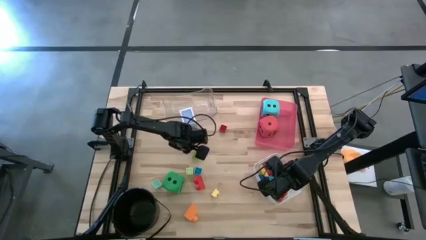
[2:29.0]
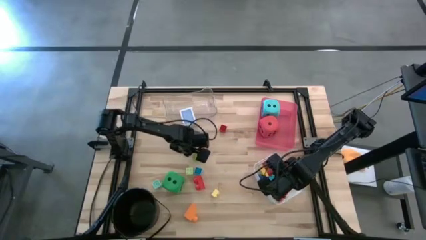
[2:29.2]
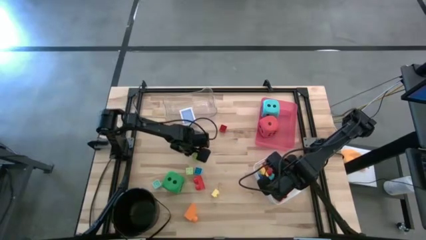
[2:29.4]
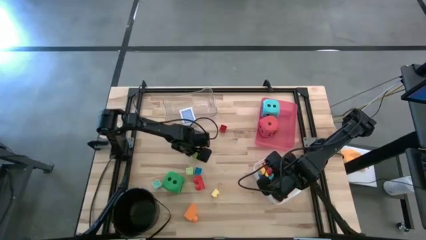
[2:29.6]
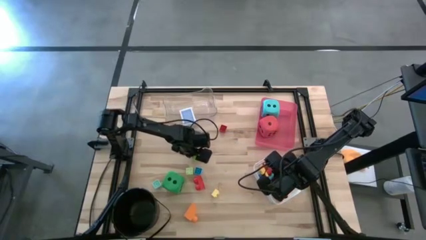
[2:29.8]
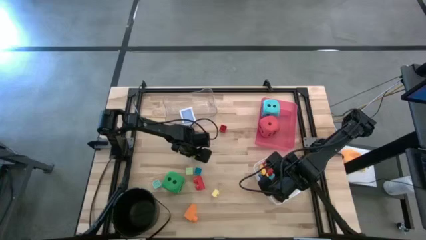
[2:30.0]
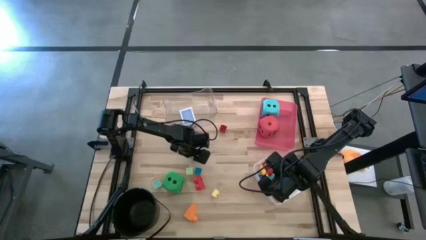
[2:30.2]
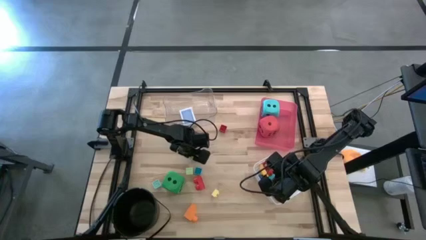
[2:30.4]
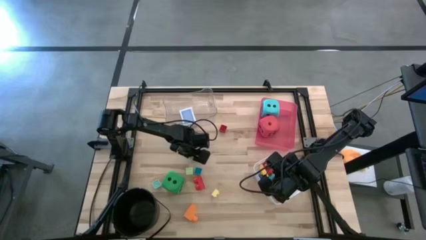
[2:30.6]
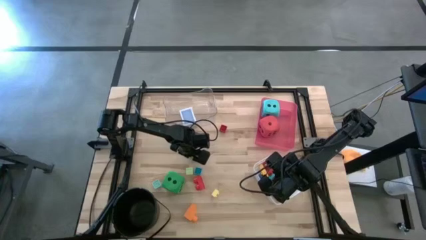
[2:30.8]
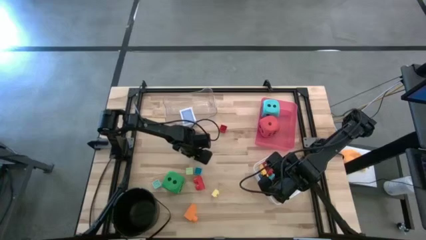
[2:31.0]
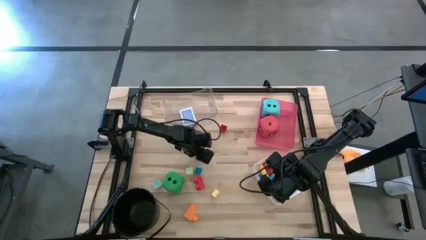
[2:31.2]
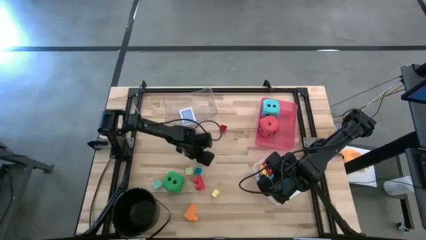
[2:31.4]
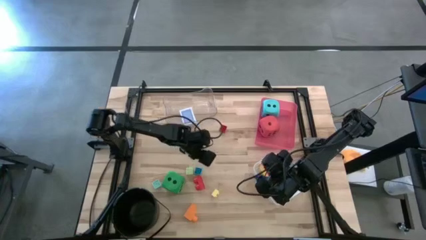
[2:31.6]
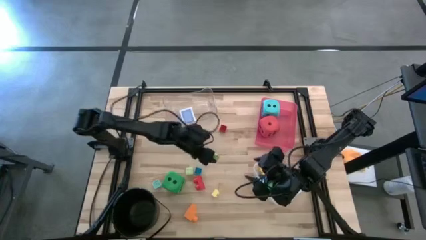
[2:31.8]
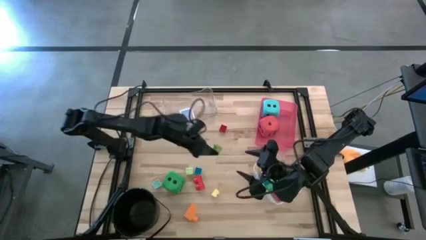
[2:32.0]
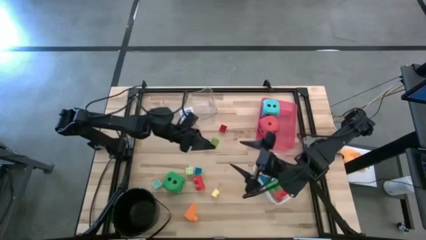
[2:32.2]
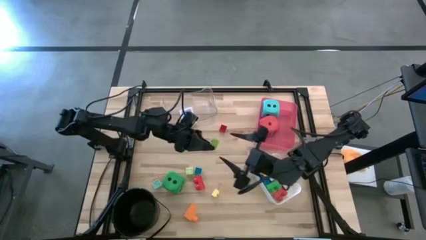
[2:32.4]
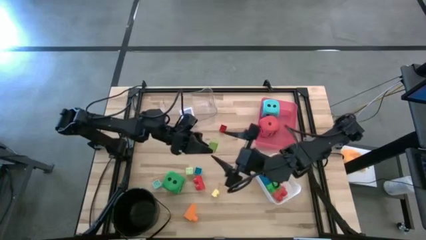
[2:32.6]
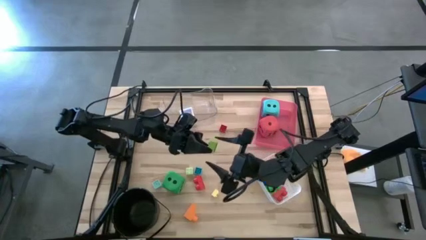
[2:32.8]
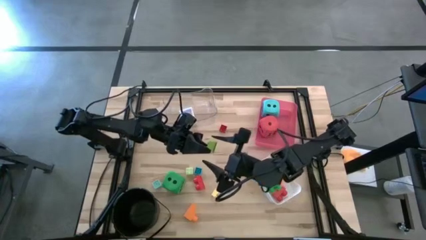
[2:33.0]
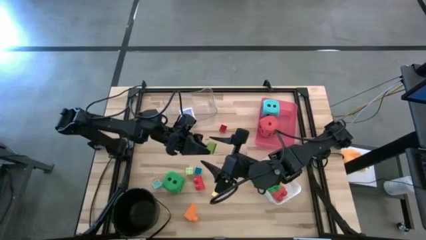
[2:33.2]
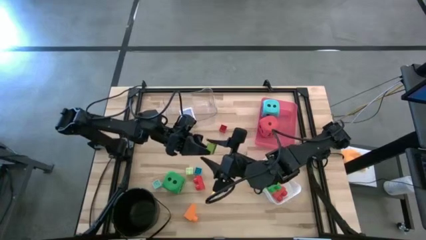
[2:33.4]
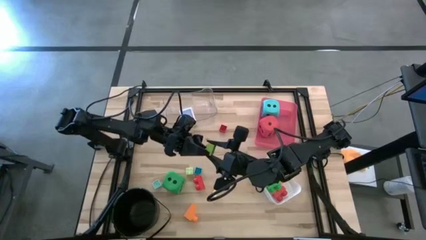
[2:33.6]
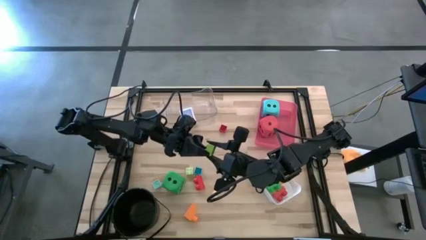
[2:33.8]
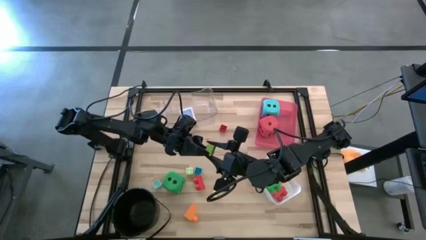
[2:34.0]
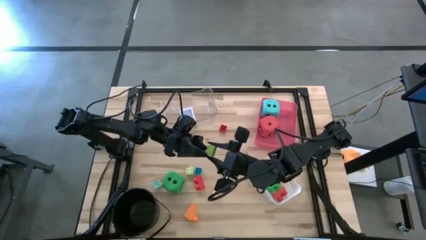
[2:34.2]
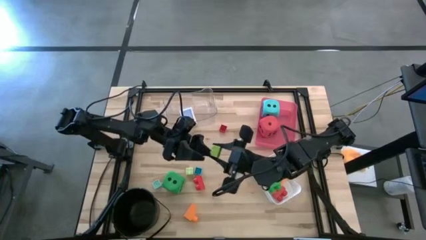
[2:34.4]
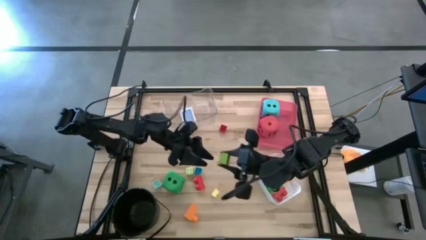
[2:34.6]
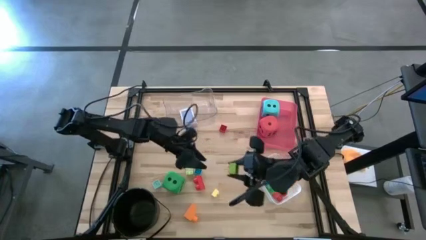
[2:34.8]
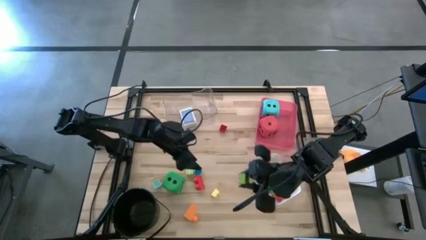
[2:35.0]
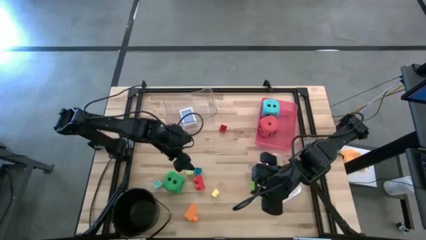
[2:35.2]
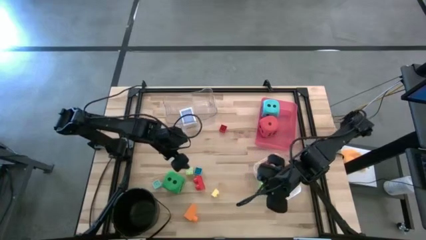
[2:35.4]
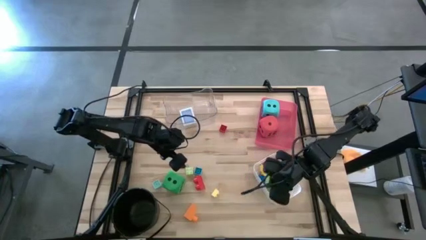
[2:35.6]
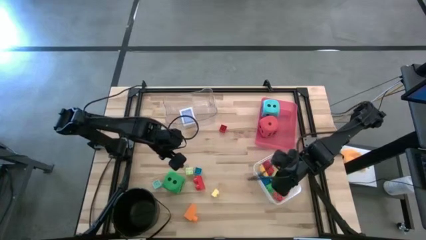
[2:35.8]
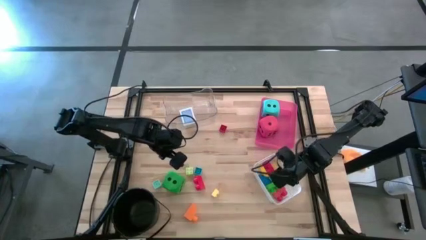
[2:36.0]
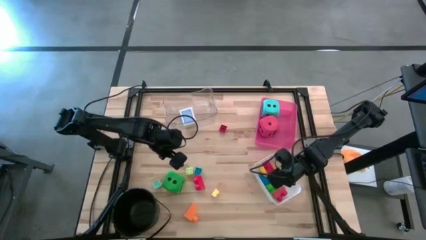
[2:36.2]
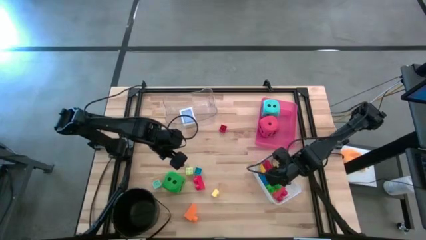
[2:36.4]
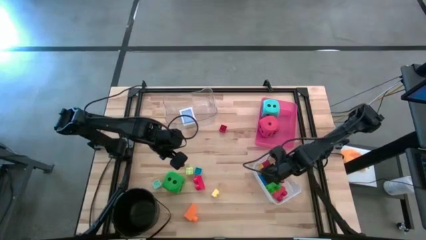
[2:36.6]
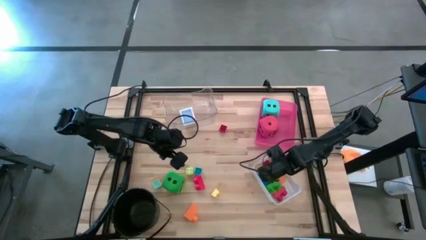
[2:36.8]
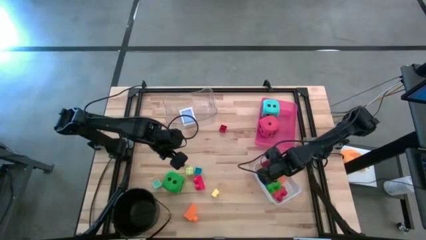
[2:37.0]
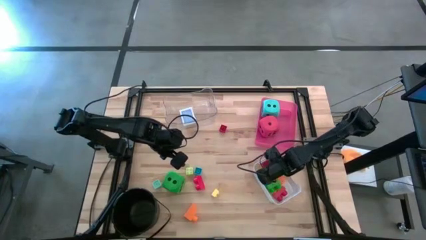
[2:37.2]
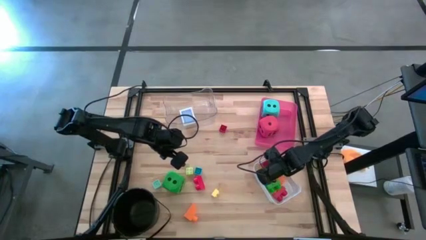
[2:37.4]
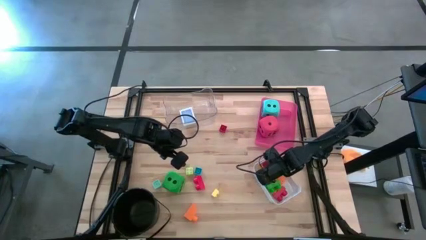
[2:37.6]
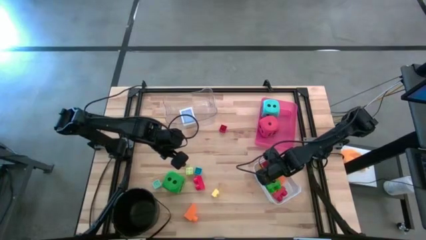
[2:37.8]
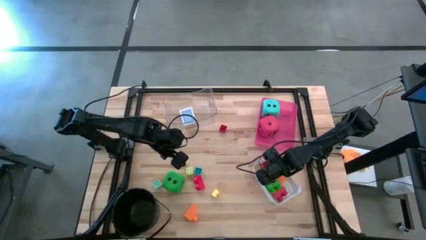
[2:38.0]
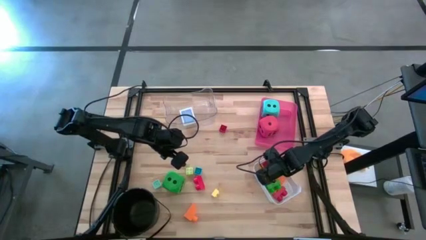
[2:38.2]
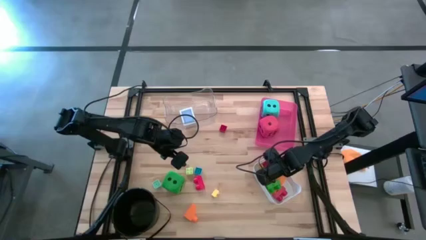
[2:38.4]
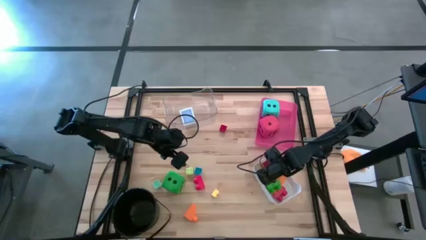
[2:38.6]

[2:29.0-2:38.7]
Task: Pick & Place Toys
Put the green game piece into the white bin

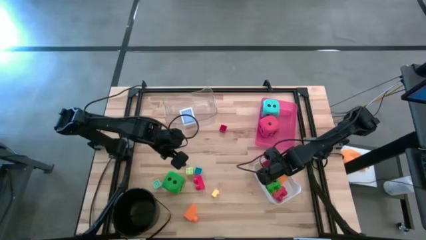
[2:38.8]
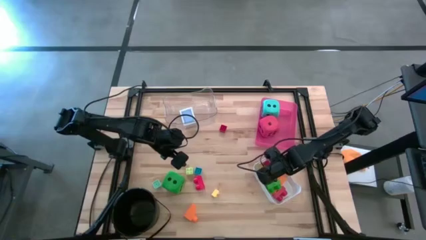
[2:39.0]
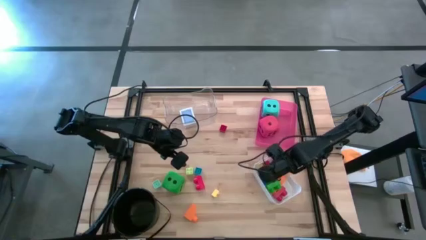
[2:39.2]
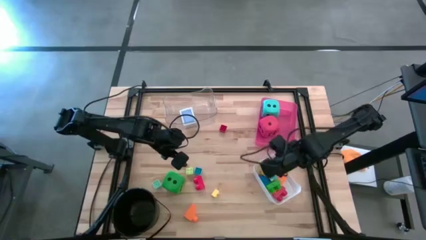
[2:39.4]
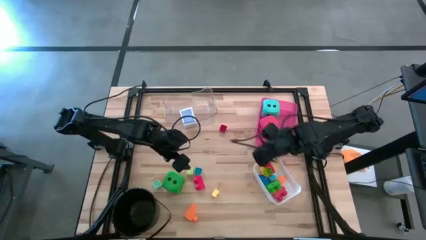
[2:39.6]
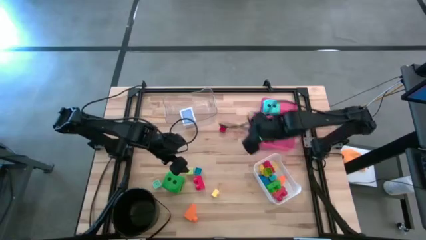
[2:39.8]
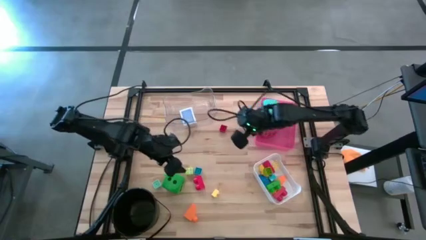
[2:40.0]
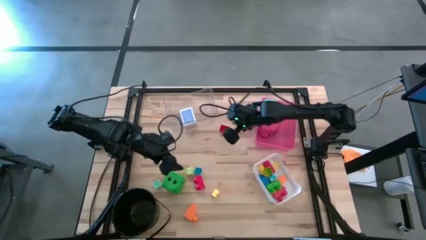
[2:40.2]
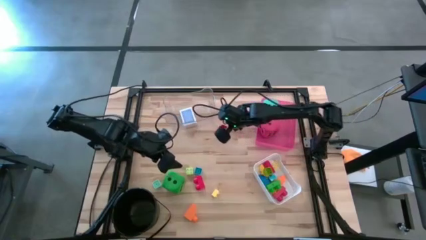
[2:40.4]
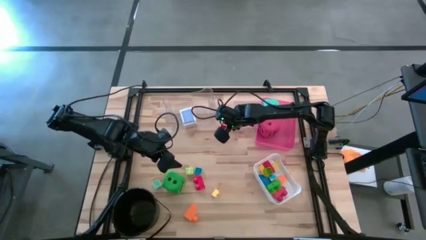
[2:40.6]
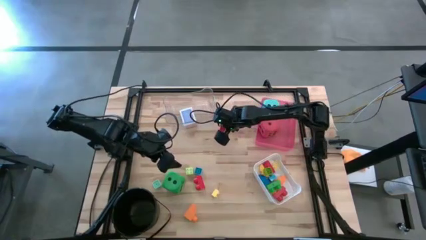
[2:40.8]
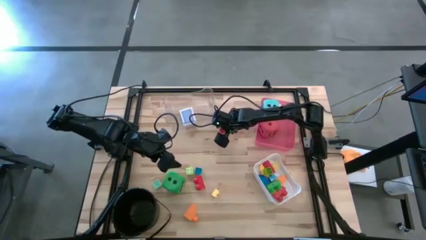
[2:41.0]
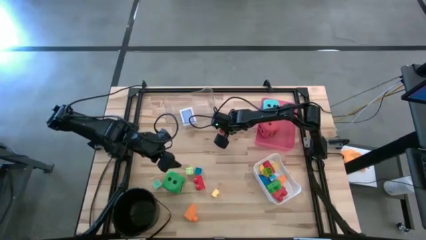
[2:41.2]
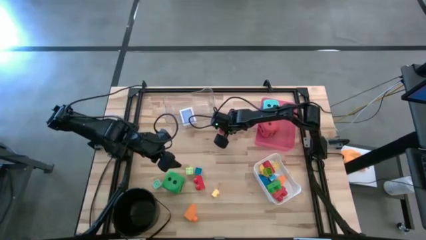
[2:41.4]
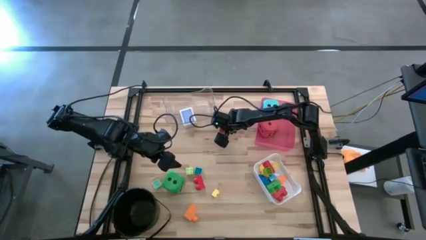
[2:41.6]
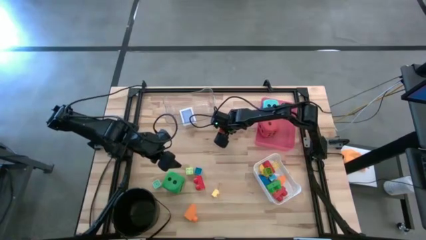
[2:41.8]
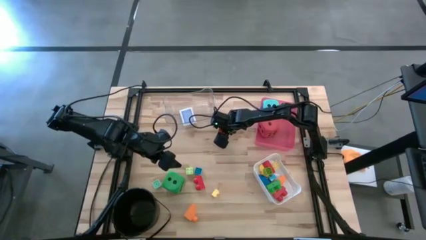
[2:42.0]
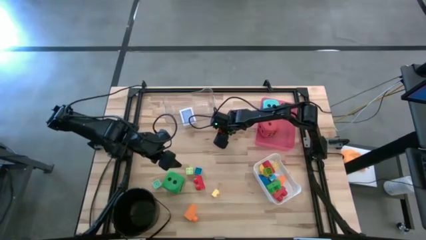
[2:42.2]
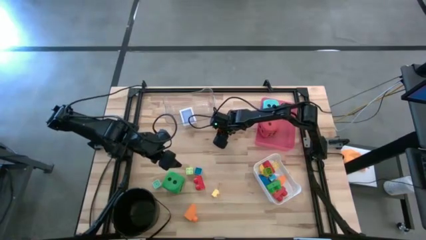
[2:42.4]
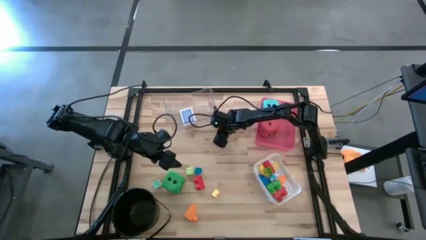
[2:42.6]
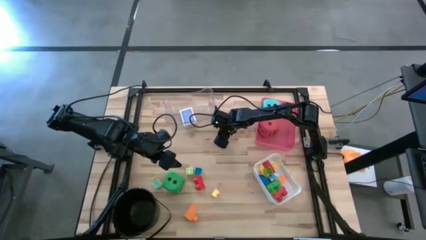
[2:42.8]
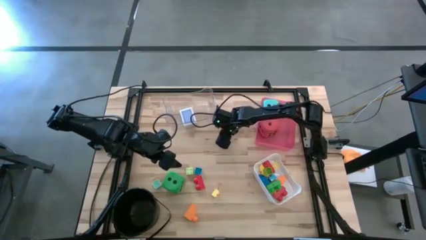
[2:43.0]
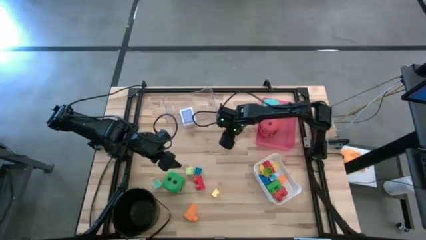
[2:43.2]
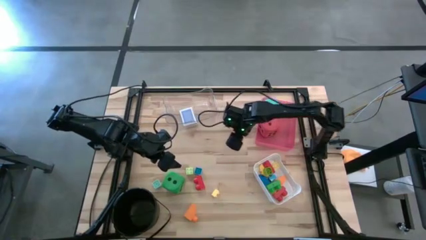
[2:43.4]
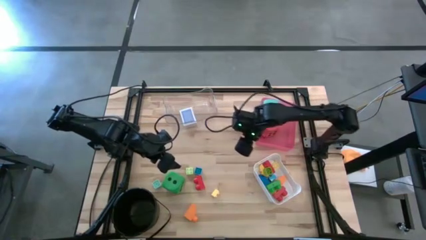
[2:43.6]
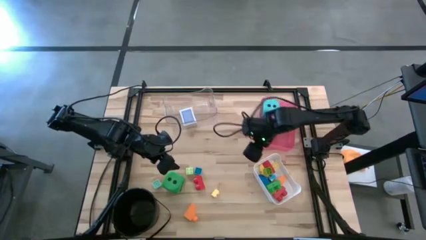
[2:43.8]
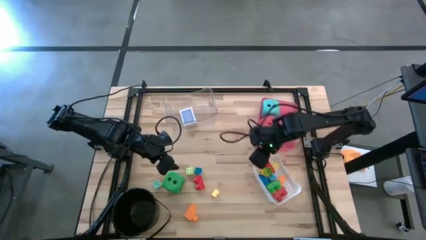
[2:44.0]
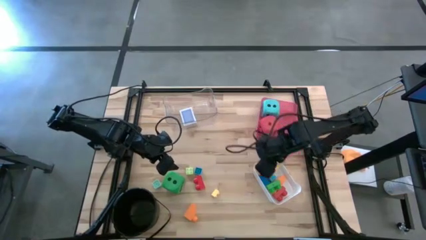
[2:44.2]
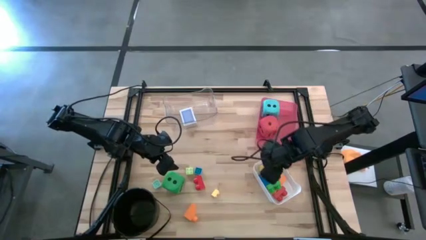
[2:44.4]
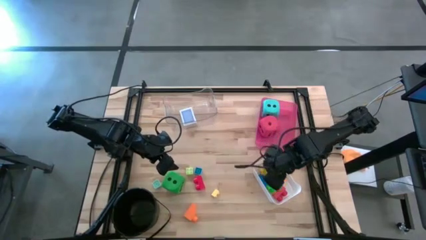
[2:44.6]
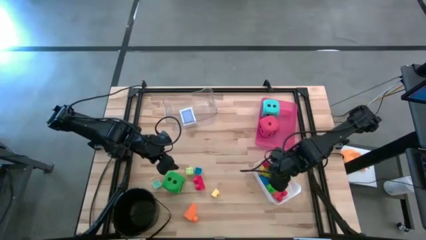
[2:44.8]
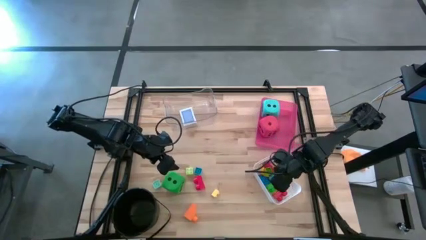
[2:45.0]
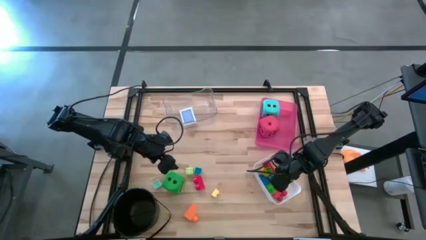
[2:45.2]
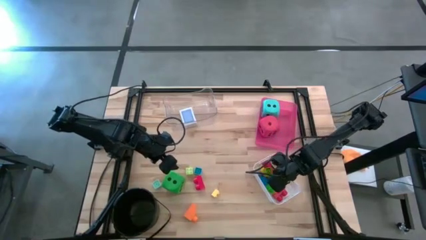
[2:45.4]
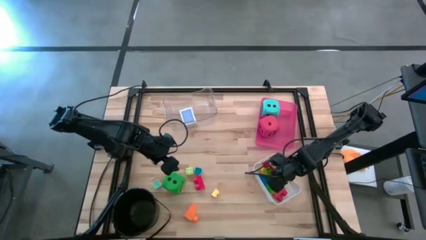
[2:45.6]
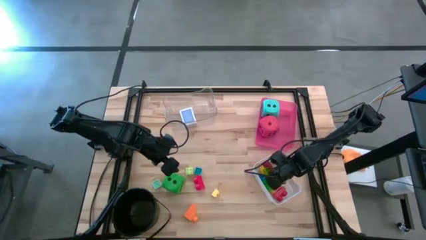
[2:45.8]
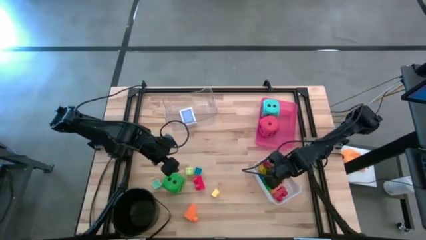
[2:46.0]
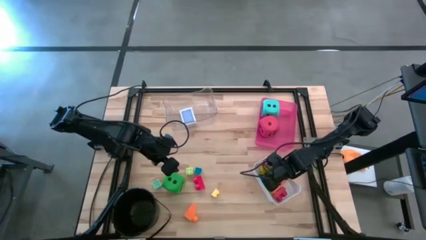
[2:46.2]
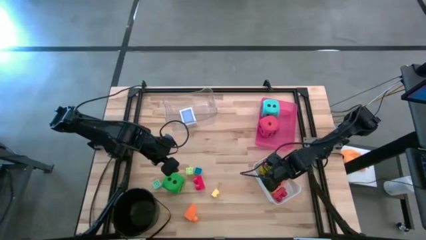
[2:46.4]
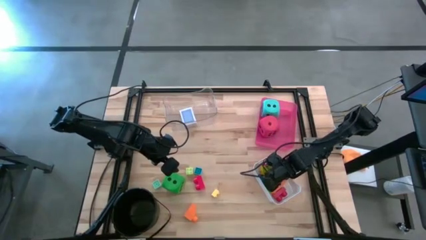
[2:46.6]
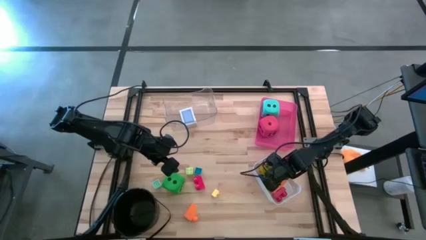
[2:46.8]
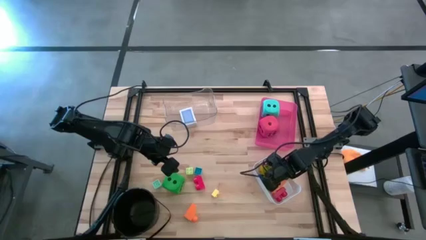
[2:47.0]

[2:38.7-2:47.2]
Put the red game piece into the white bin
